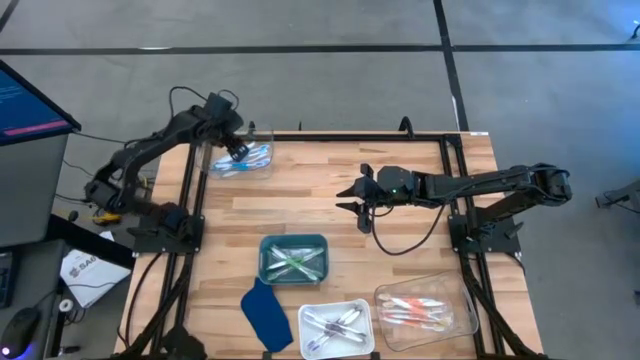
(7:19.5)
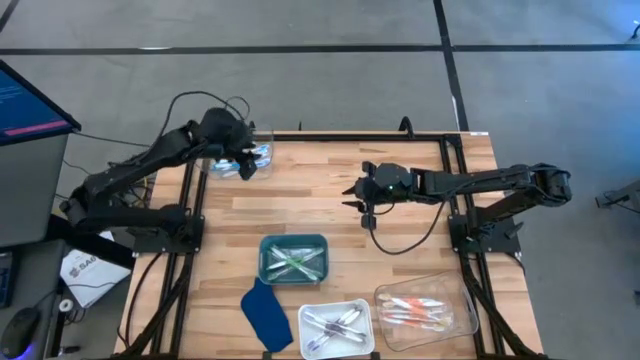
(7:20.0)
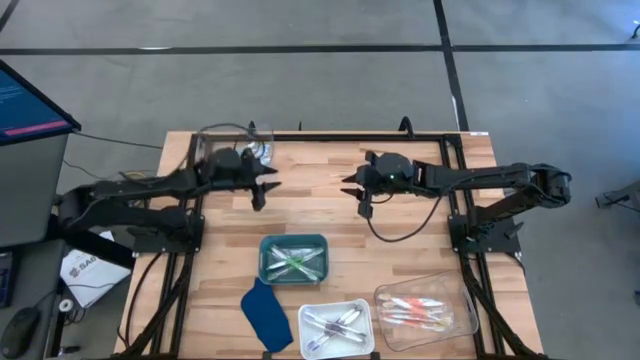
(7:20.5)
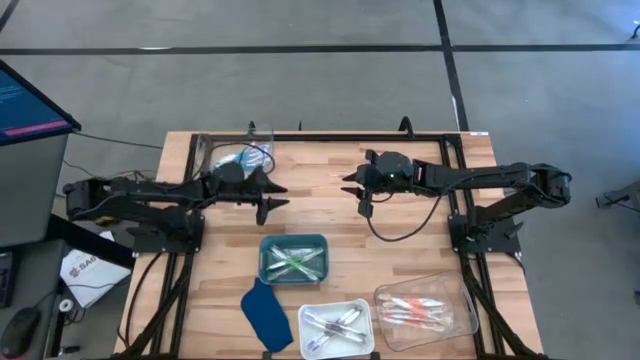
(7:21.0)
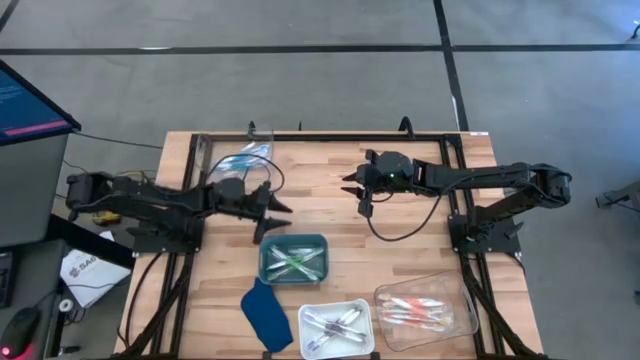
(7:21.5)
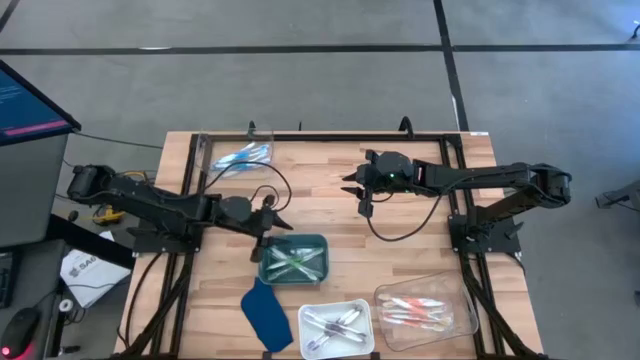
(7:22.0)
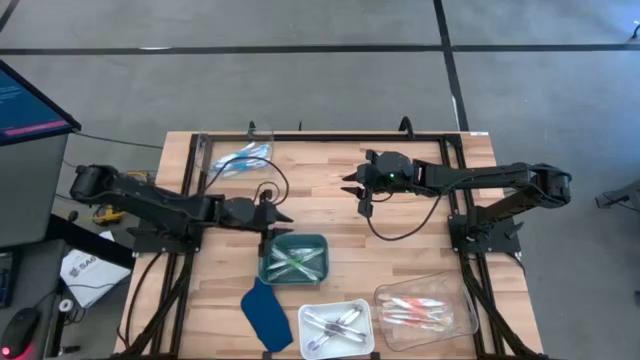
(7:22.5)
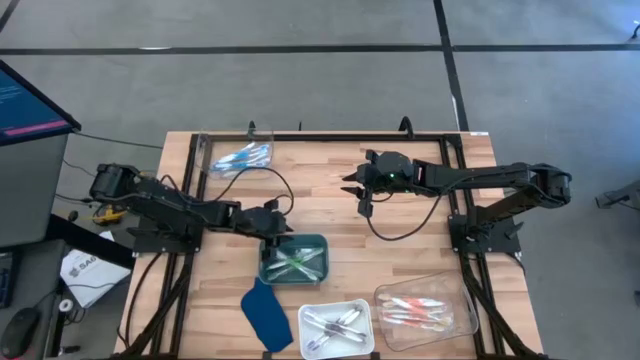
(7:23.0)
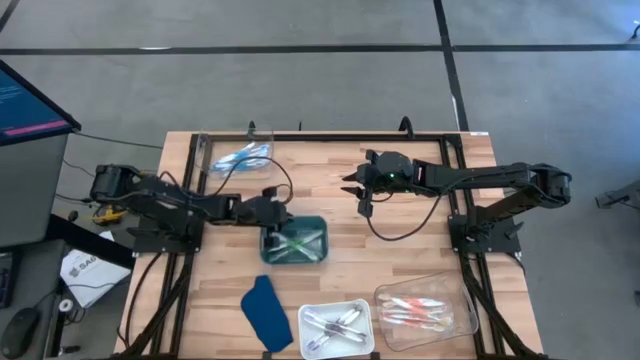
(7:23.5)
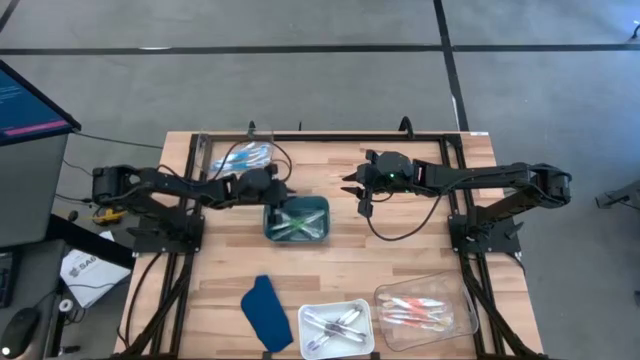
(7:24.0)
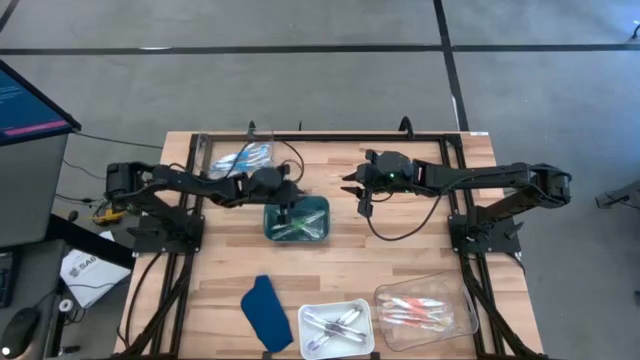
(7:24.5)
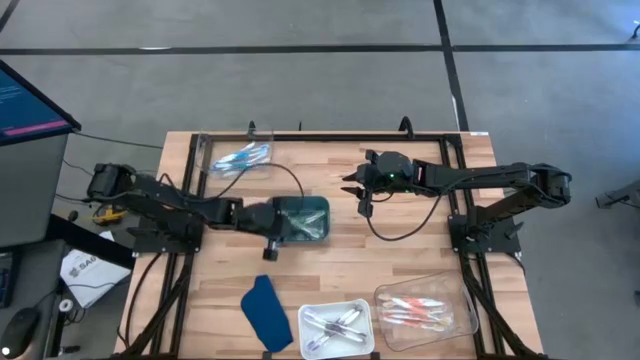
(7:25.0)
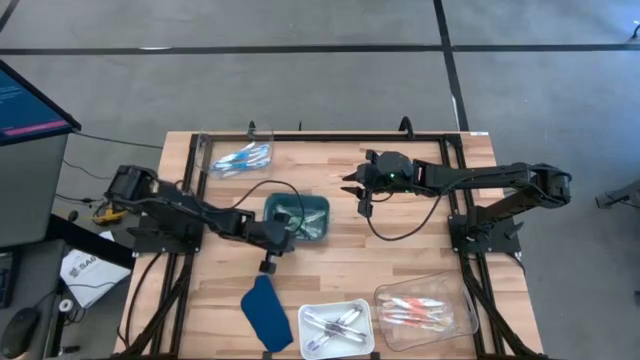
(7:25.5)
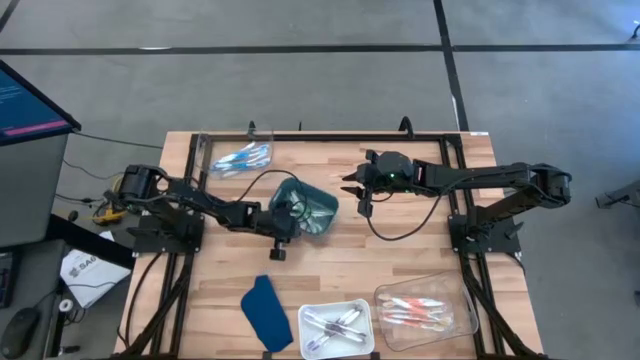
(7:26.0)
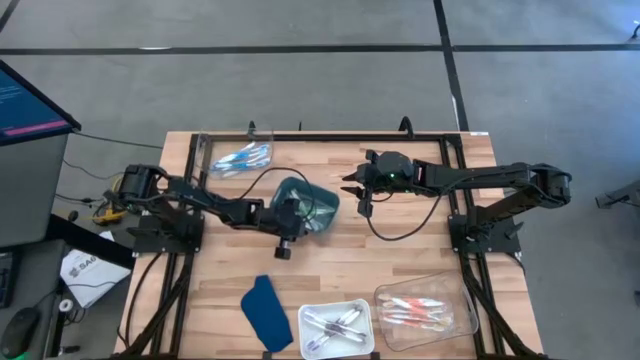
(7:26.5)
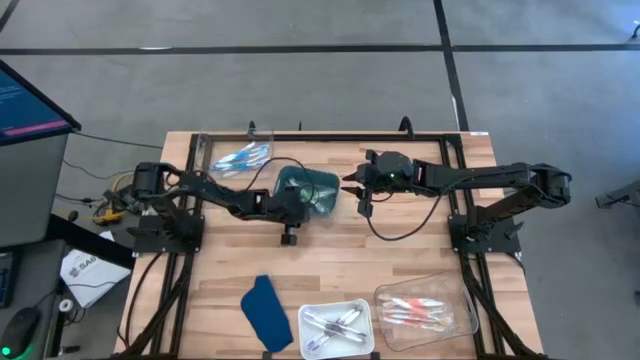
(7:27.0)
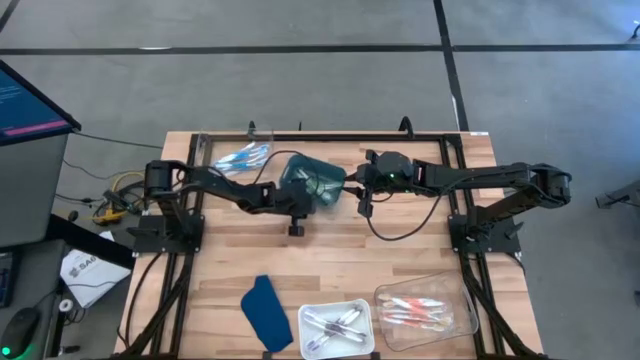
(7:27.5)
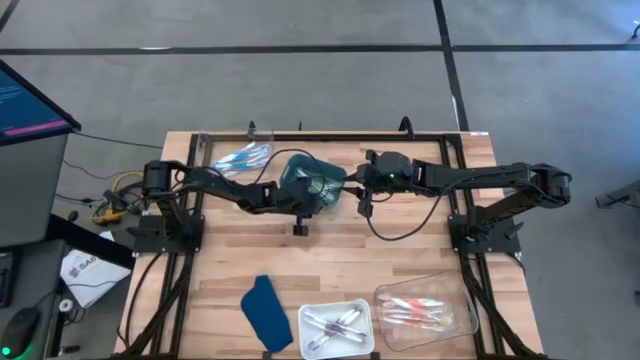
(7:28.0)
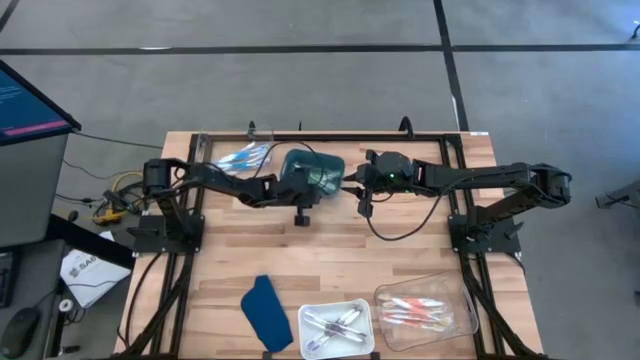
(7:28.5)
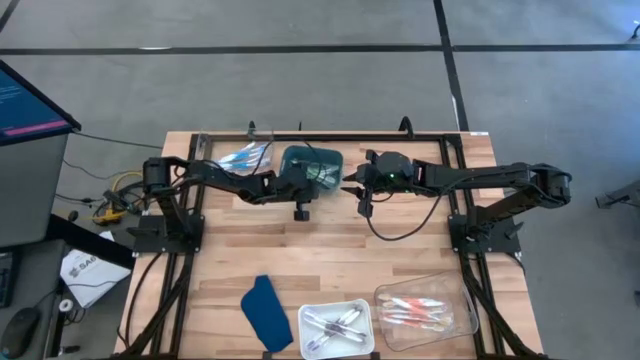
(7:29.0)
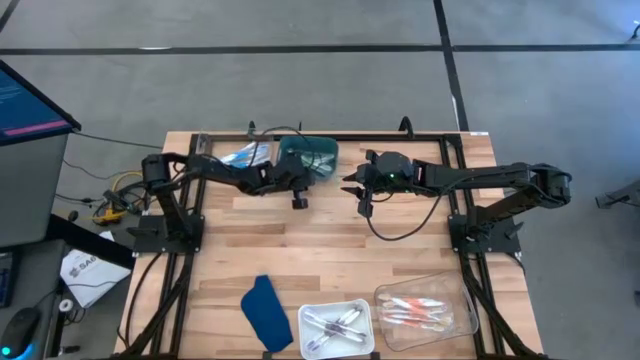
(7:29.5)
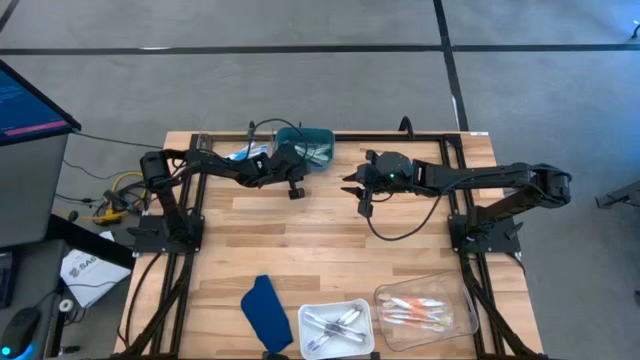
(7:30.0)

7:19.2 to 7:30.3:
Task: Pick & Place Toothbrushes
Move the green bin to the top of the table

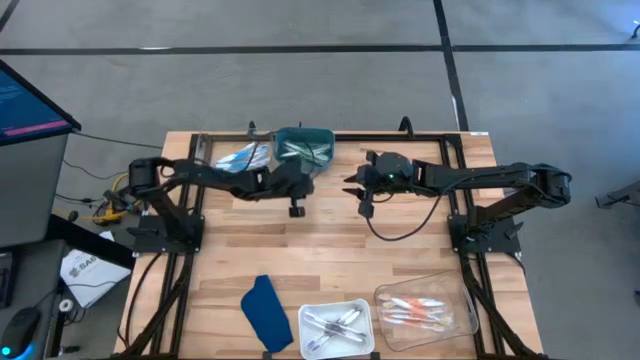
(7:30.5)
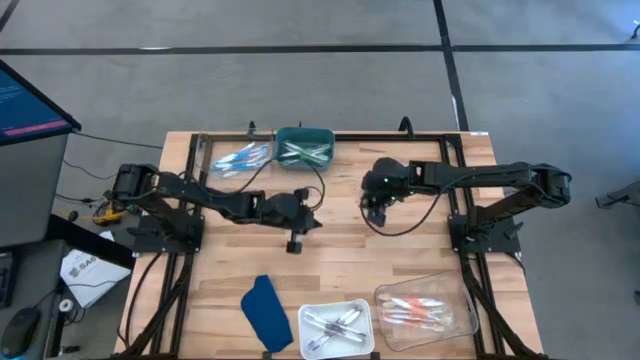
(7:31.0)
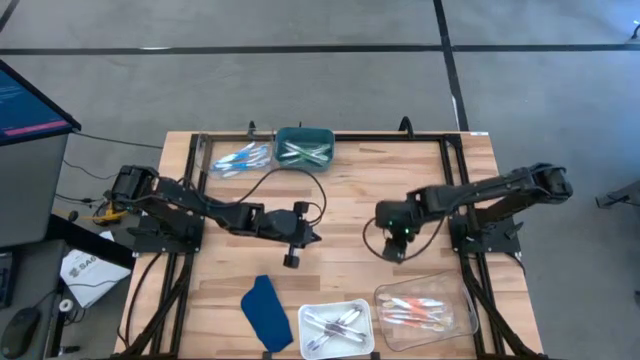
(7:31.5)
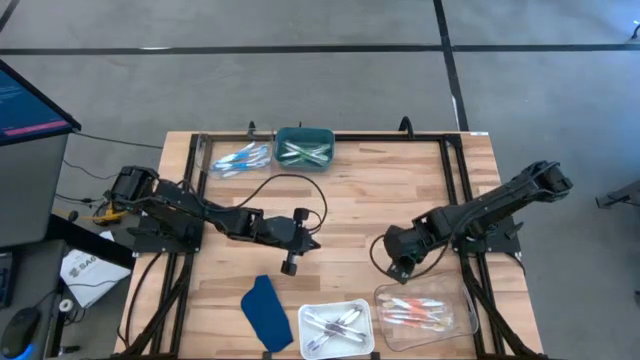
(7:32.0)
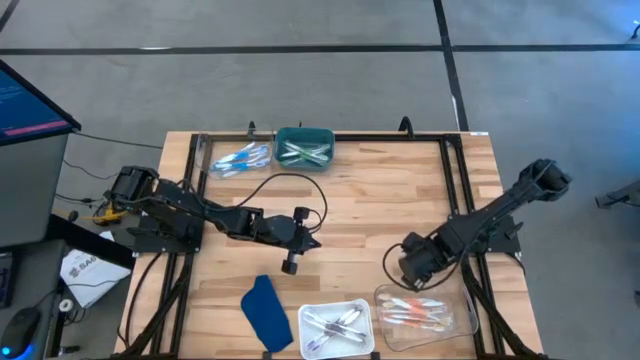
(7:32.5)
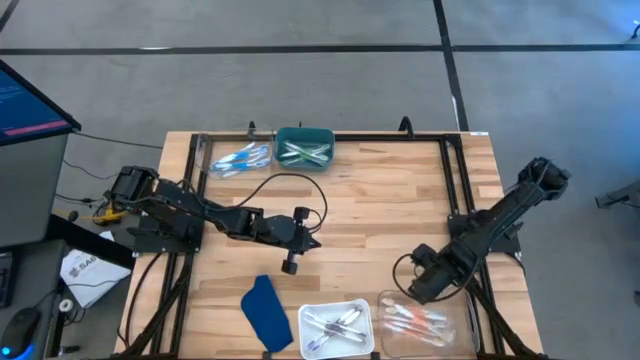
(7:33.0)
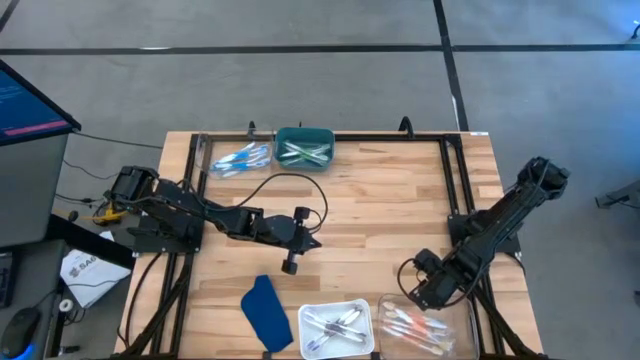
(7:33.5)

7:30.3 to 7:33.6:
Adjust the bottom transparent bin

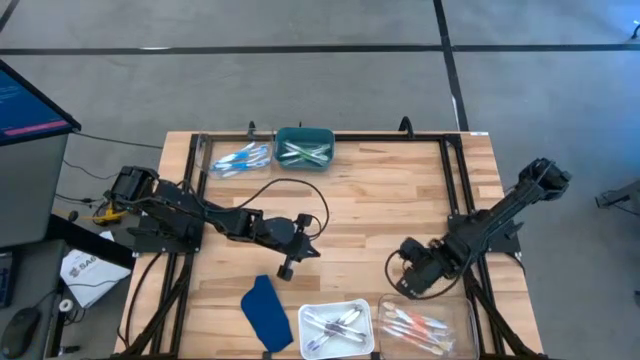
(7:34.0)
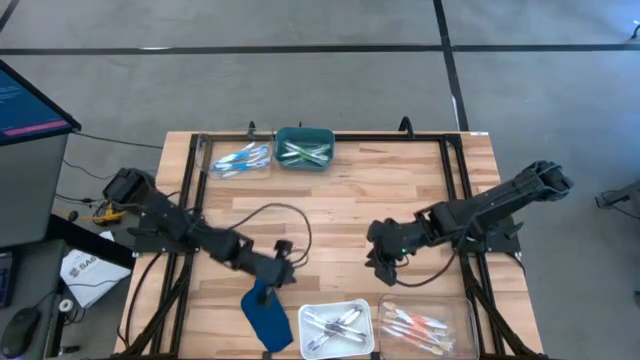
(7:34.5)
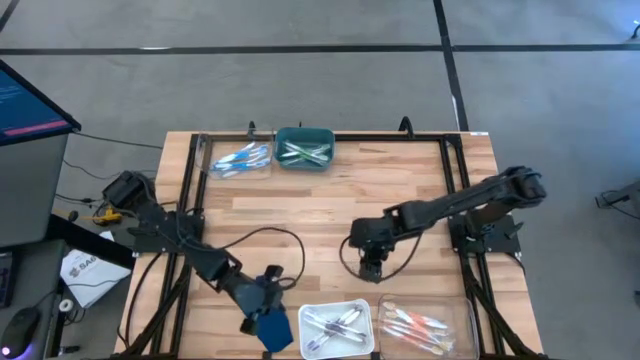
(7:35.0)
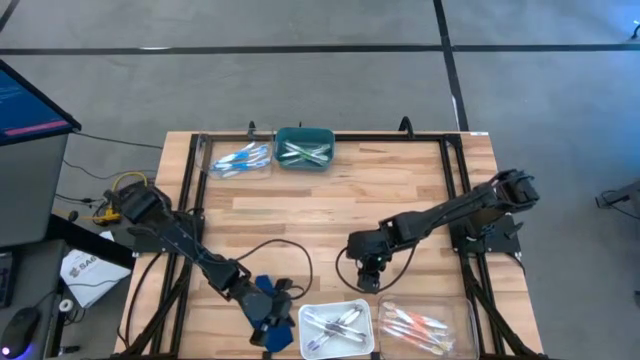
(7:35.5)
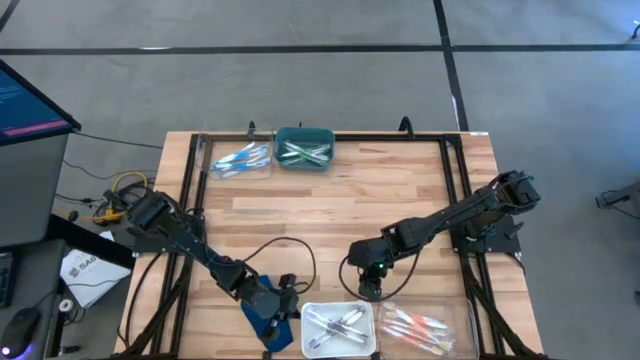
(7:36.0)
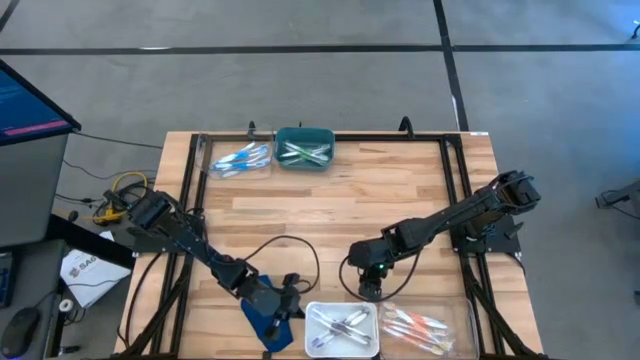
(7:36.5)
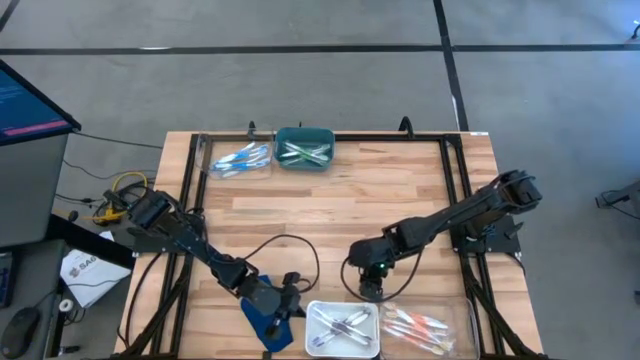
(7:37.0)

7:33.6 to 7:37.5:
Adjust the white bin

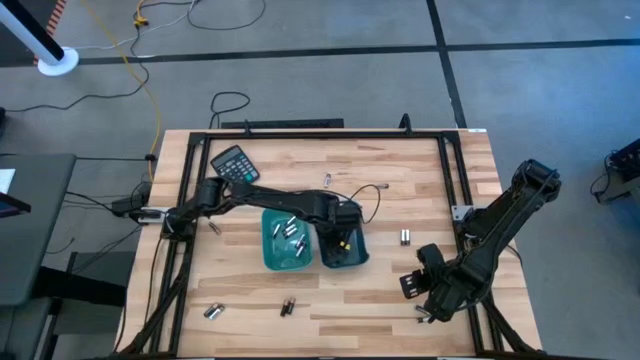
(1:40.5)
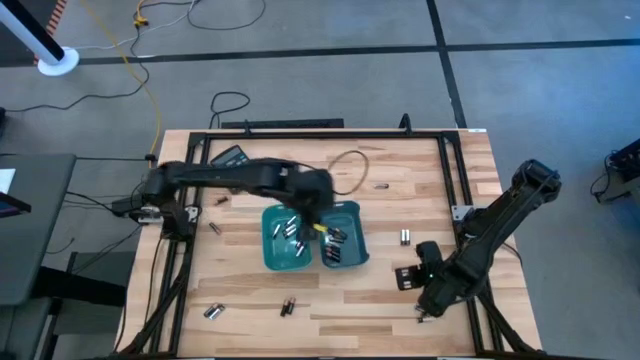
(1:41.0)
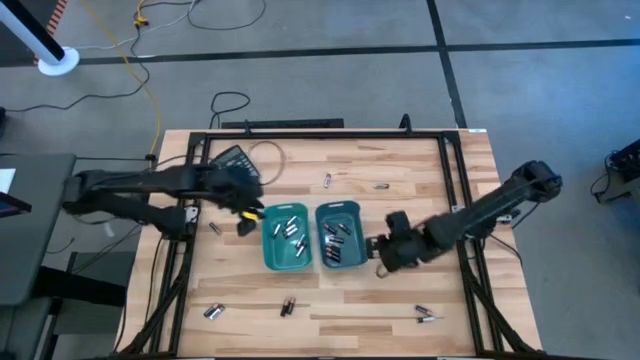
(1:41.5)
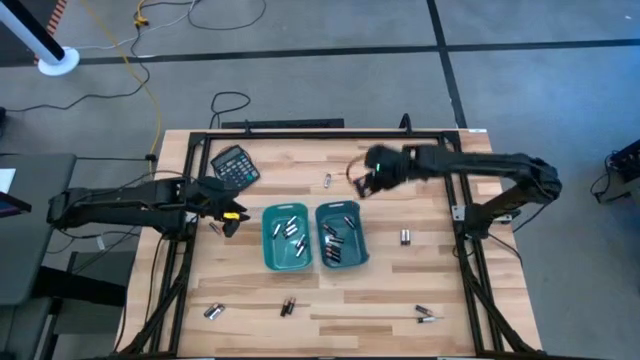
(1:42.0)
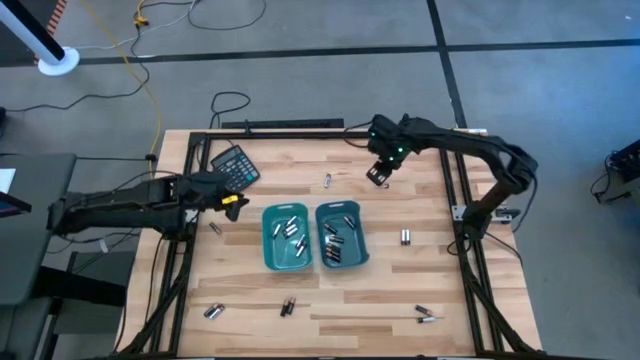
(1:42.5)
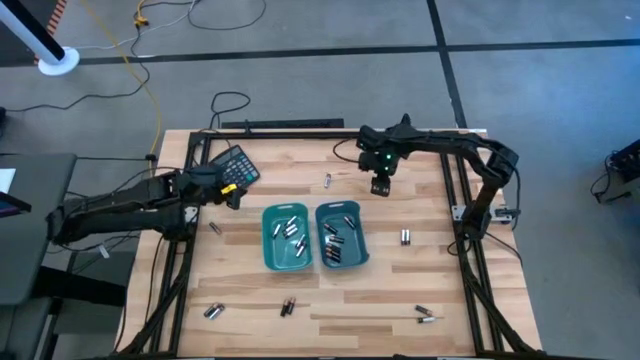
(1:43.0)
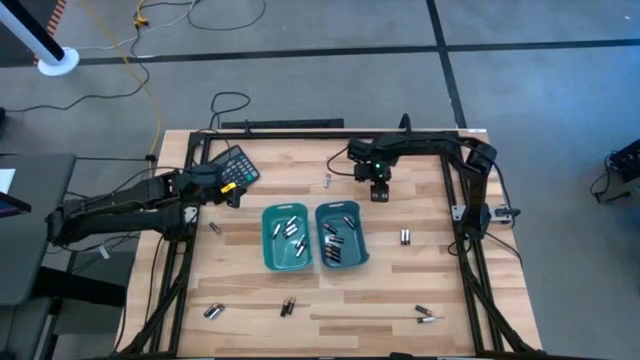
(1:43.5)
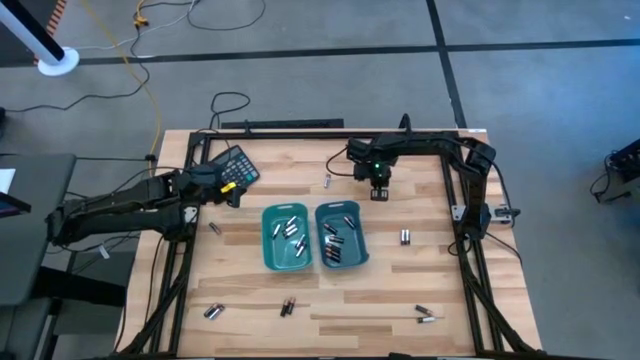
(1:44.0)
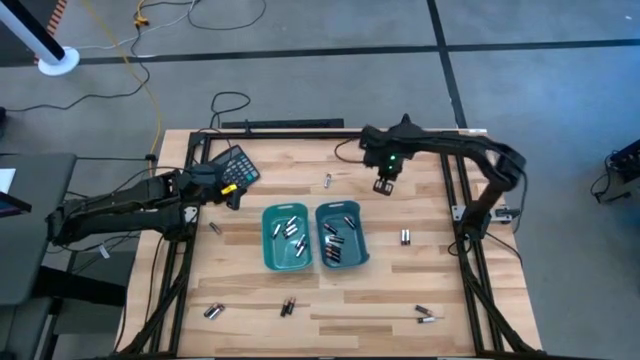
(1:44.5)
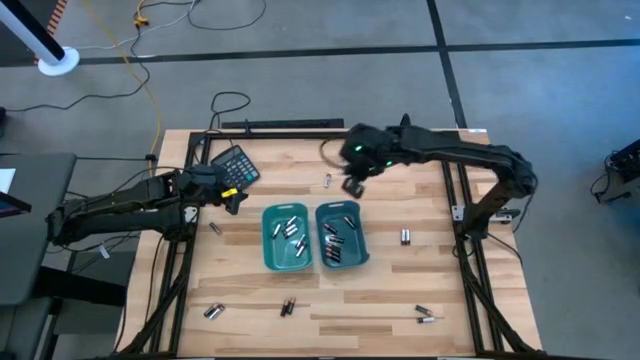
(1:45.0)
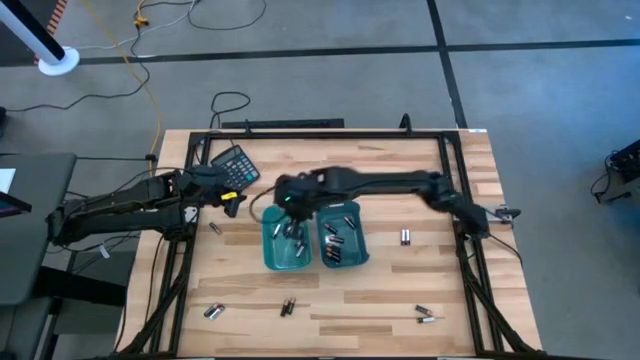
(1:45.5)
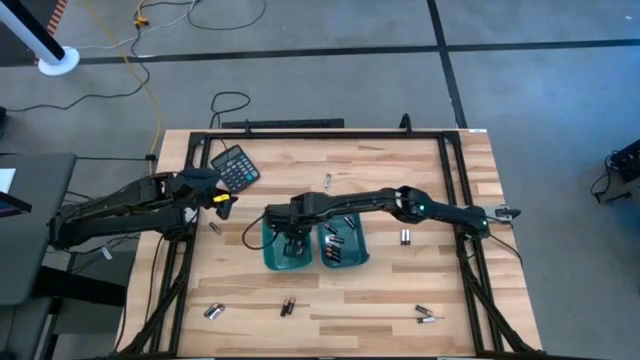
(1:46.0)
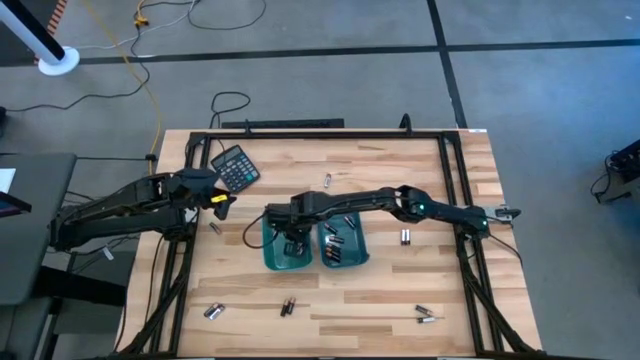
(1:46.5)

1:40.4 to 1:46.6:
Task: Sort batteries
Put the silver battery into the green bin
